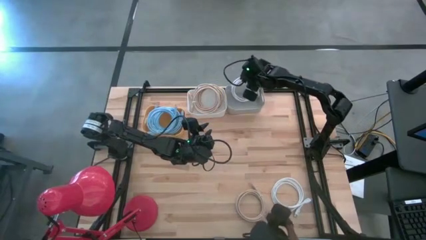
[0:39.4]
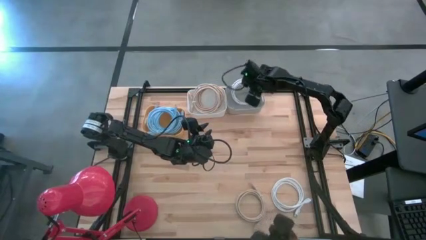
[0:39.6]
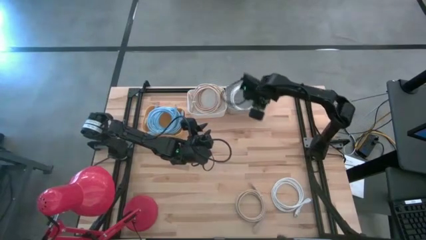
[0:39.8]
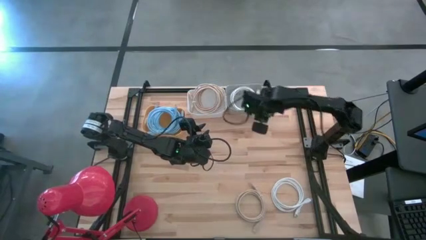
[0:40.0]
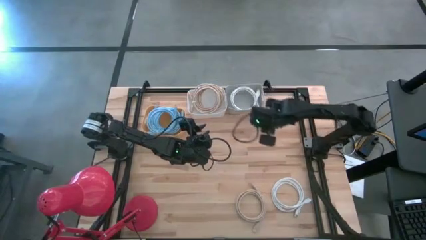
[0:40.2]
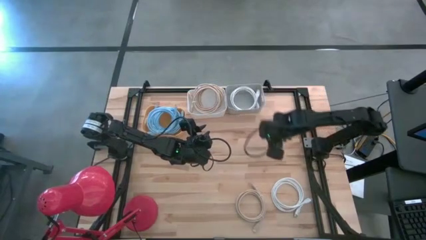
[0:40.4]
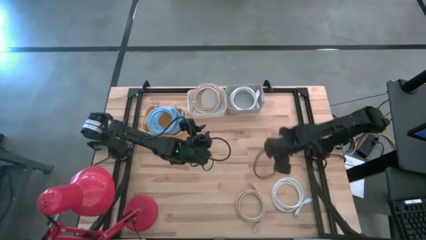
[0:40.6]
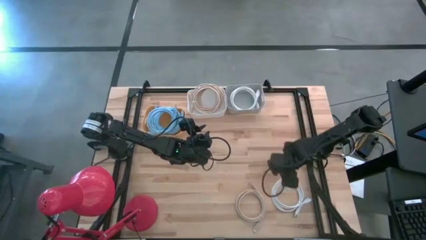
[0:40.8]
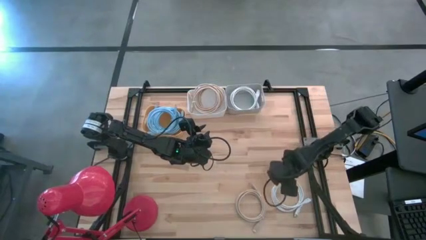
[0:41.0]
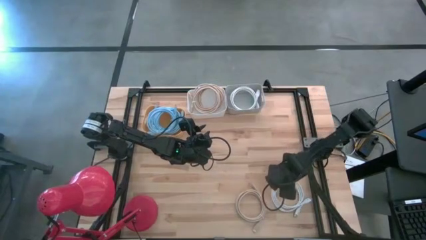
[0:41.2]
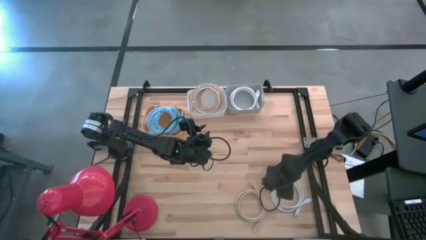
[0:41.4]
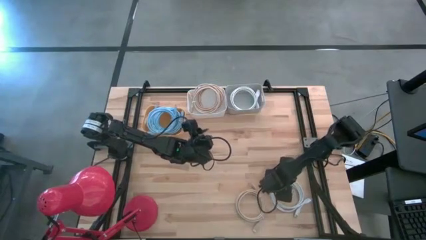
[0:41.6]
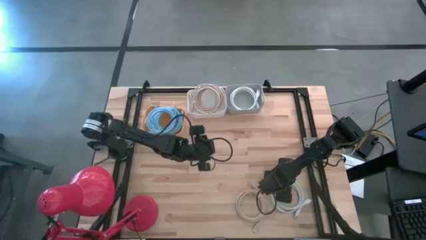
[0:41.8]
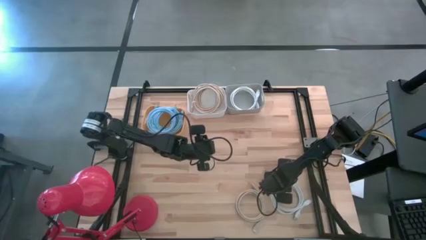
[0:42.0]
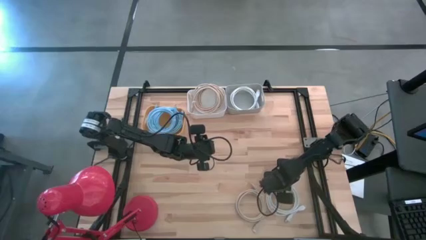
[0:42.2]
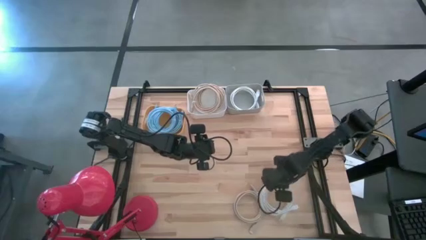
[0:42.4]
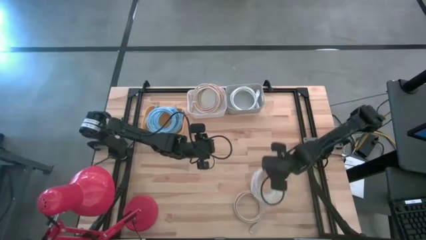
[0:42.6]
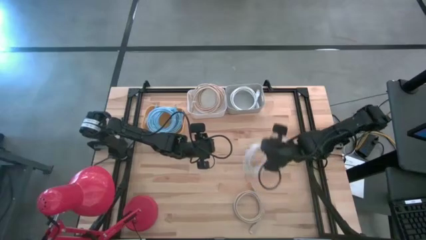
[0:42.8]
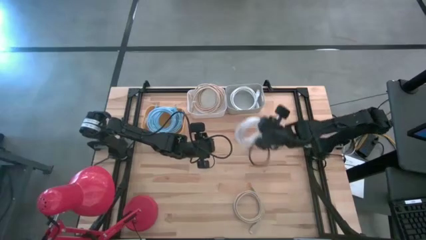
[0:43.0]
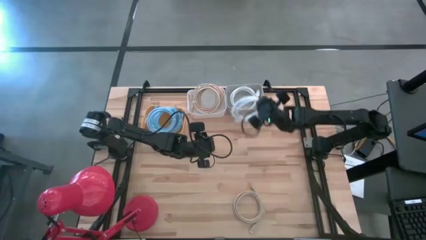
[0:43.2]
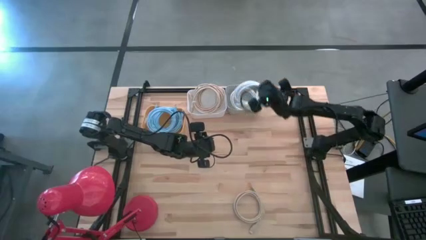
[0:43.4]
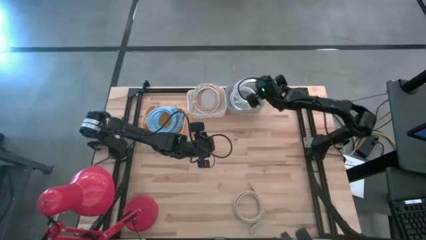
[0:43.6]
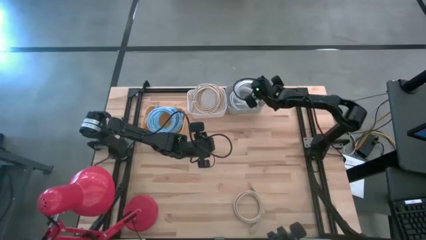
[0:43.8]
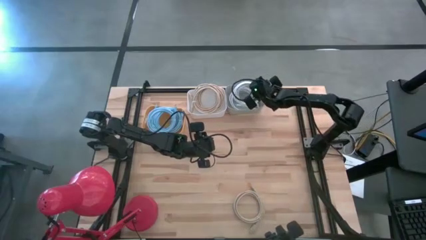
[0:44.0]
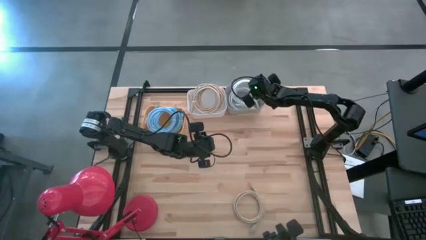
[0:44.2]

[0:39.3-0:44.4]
Task: Sort HDMI cables
Put the white HDMI cable into the gray bin

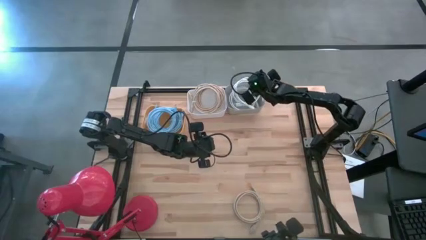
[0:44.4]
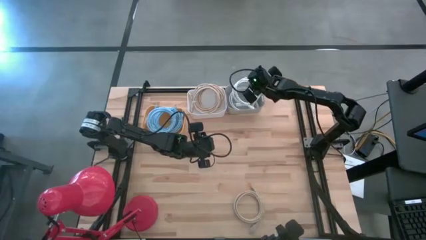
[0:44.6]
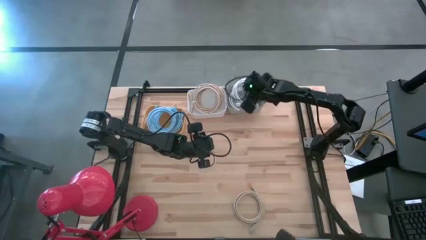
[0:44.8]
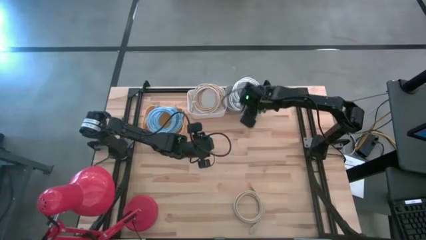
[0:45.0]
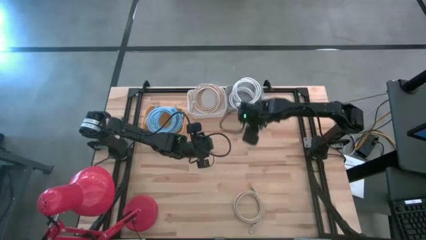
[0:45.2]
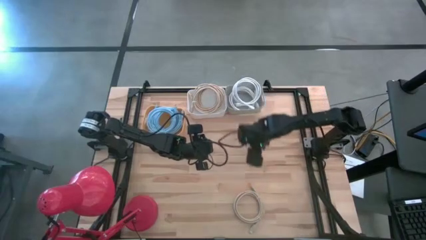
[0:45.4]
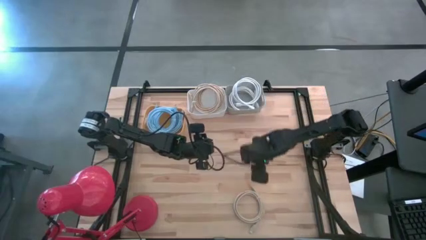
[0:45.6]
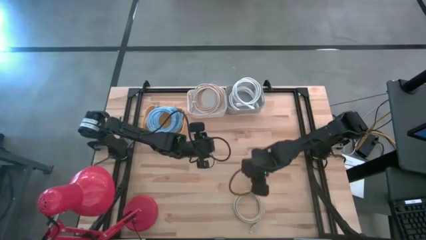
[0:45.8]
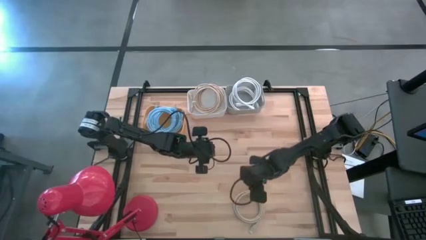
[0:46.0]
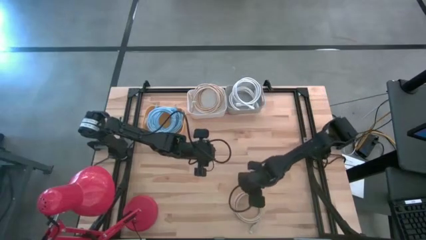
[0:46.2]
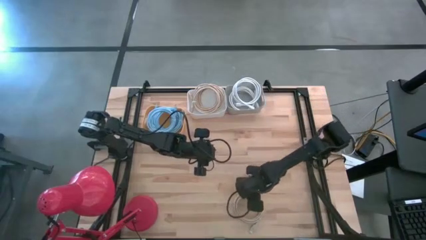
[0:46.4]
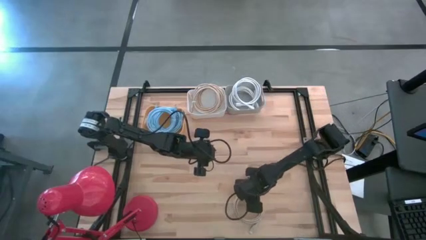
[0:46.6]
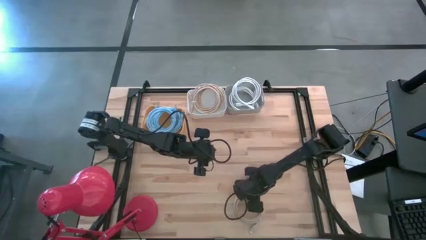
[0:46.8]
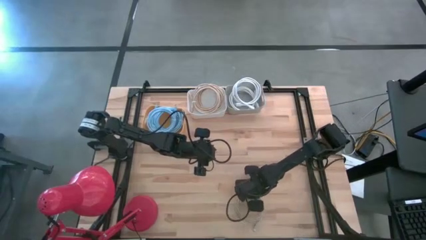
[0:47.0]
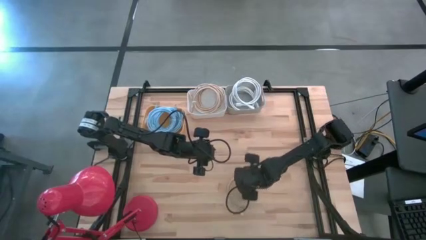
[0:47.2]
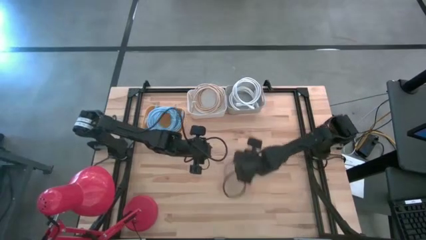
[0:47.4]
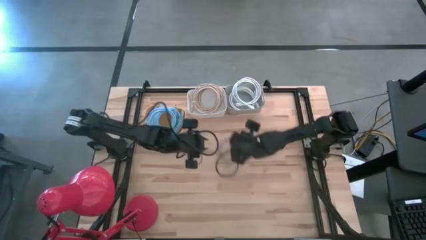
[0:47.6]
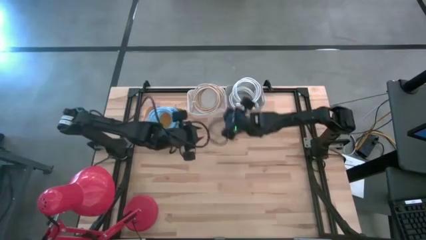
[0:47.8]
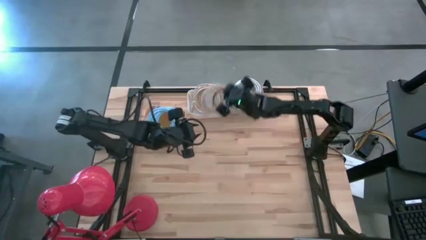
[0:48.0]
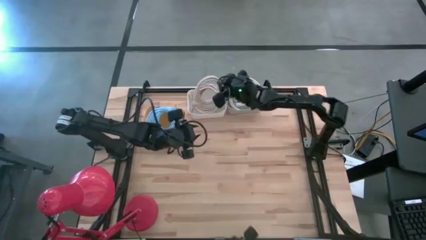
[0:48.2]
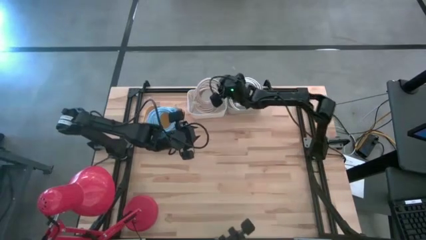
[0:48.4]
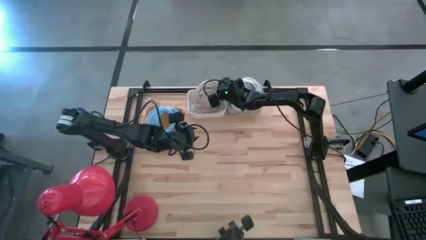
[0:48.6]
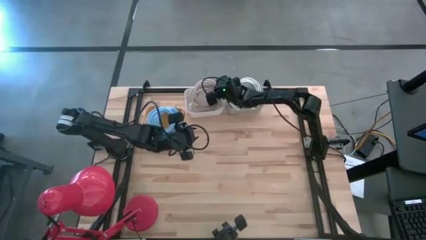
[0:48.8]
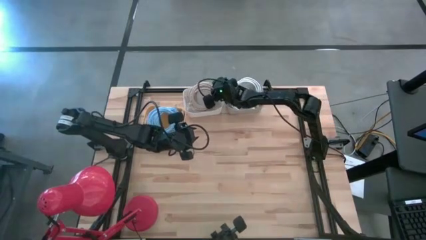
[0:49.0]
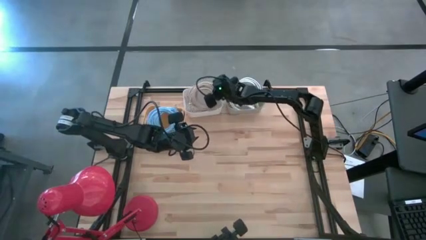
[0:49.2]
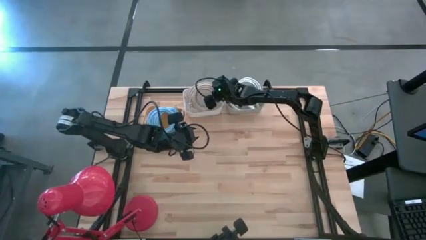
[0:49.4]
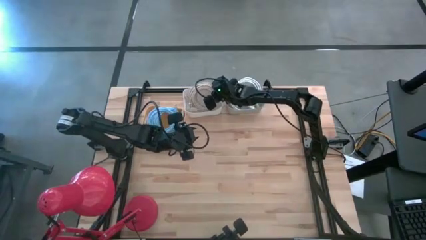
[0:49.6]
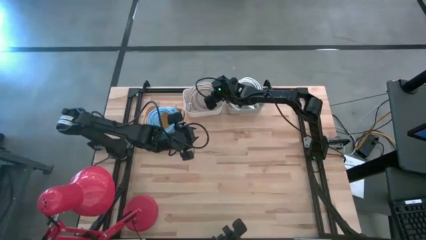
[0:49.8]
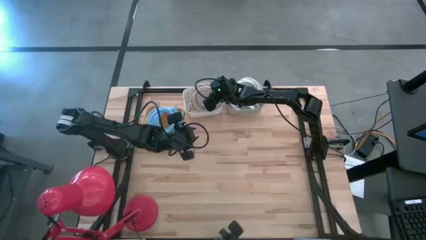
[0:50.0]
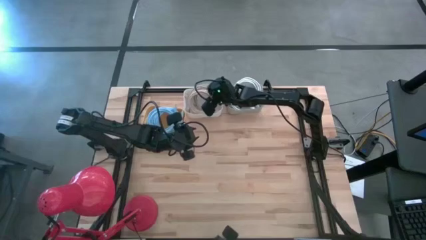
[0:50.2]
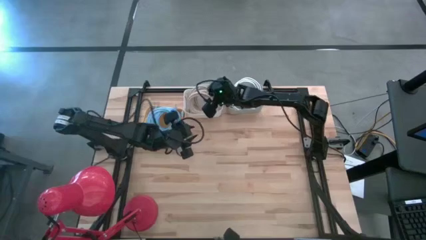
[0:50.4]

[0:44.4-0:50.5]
Put the brown HDMI cable into the white bin

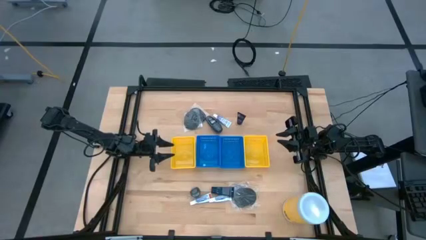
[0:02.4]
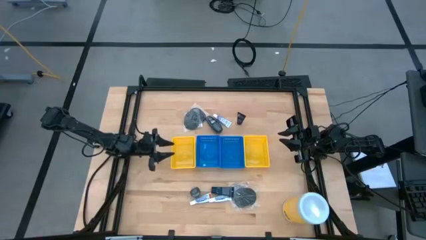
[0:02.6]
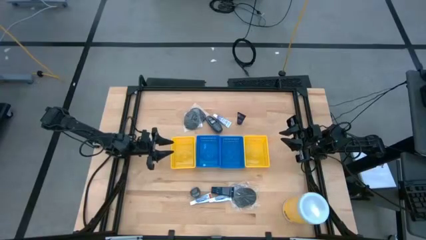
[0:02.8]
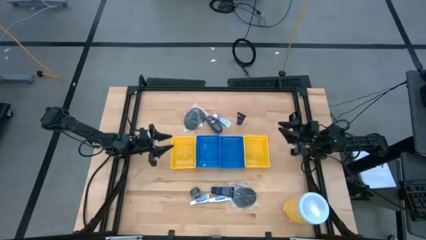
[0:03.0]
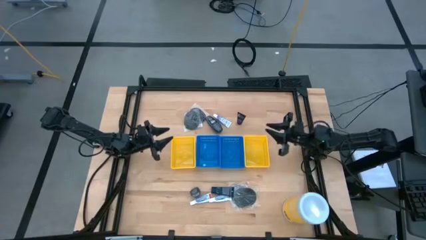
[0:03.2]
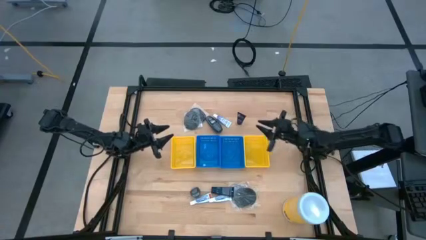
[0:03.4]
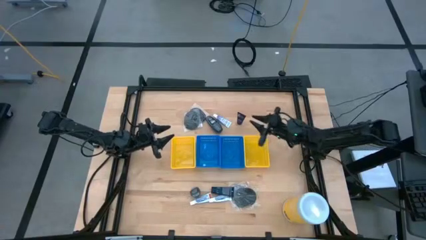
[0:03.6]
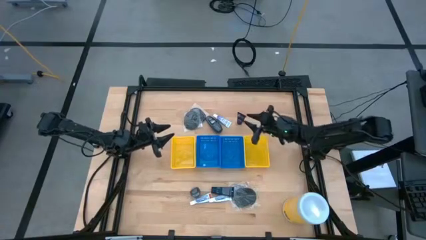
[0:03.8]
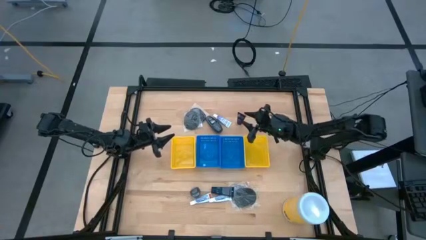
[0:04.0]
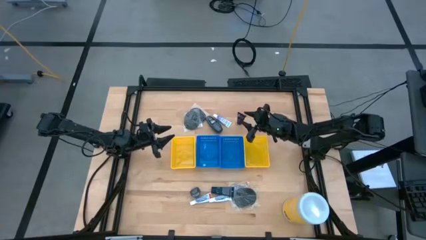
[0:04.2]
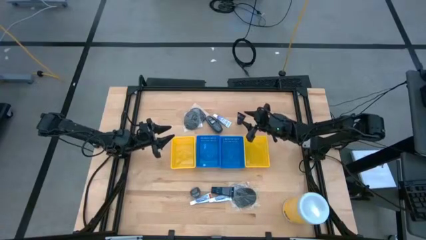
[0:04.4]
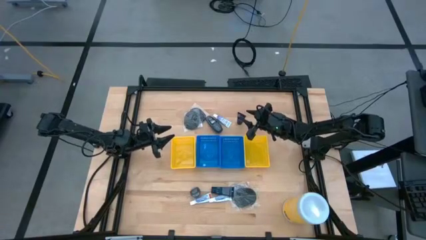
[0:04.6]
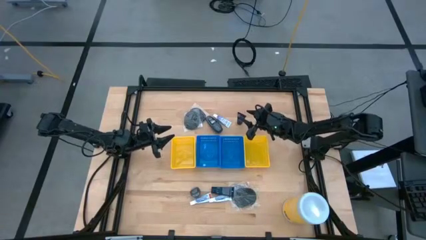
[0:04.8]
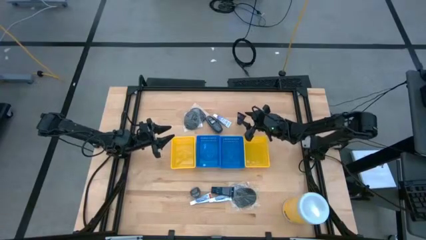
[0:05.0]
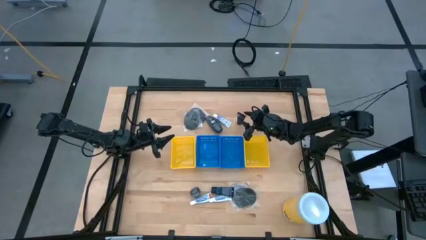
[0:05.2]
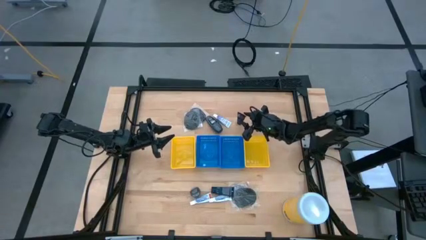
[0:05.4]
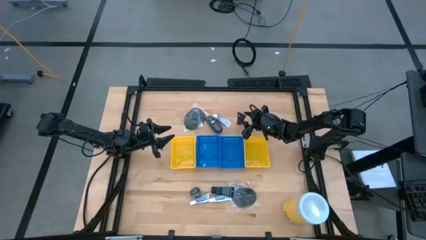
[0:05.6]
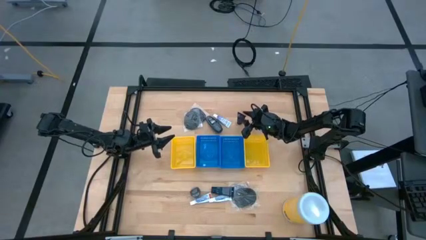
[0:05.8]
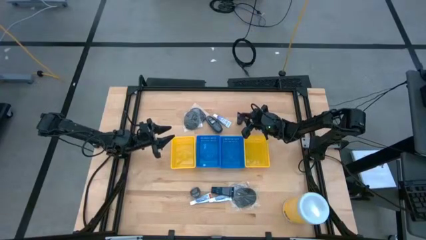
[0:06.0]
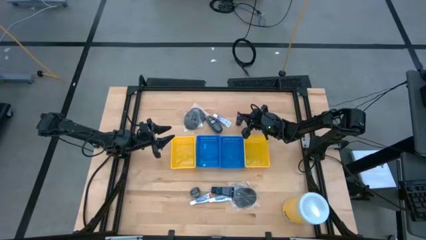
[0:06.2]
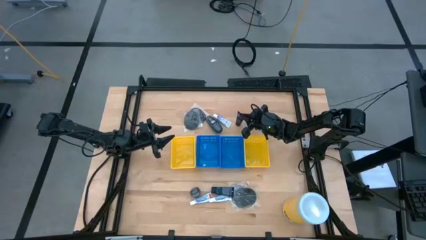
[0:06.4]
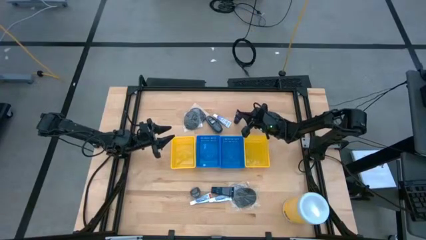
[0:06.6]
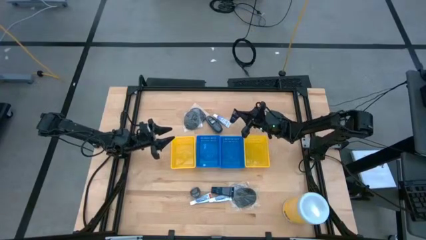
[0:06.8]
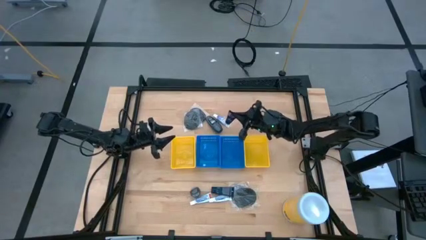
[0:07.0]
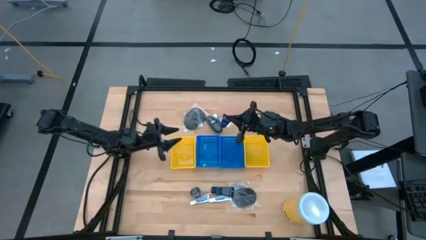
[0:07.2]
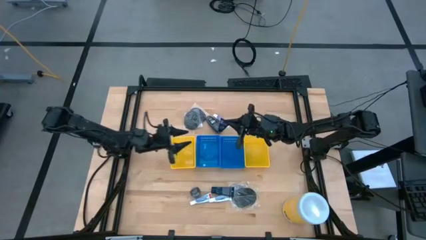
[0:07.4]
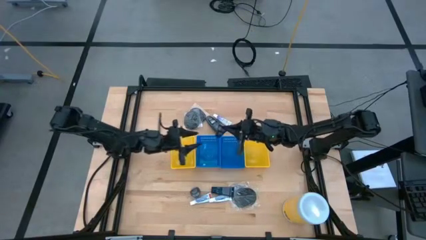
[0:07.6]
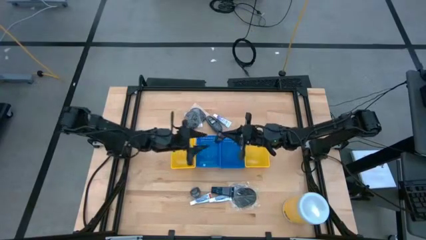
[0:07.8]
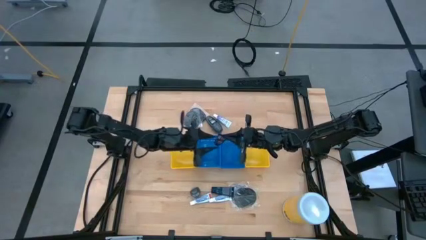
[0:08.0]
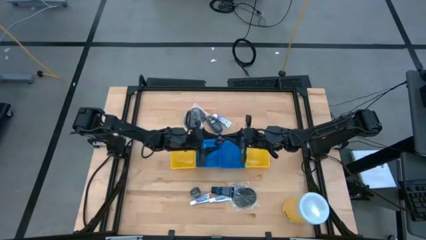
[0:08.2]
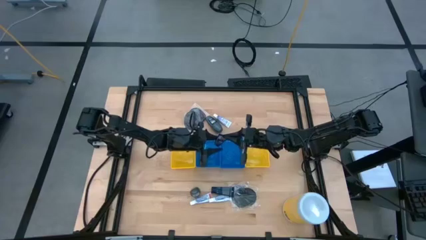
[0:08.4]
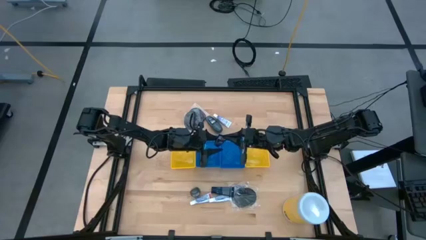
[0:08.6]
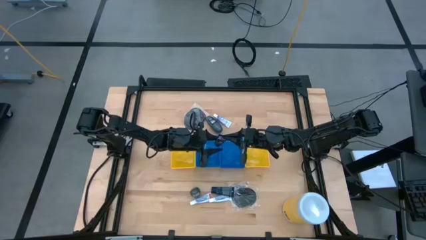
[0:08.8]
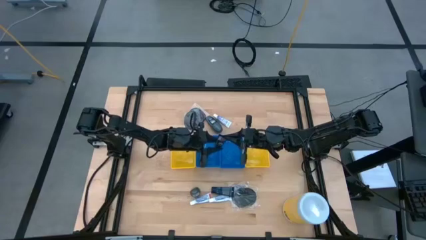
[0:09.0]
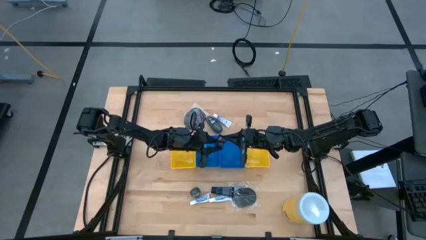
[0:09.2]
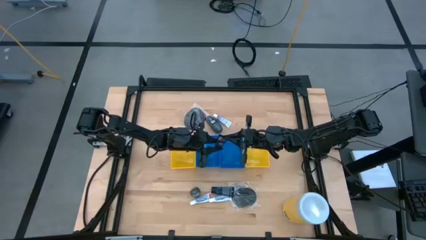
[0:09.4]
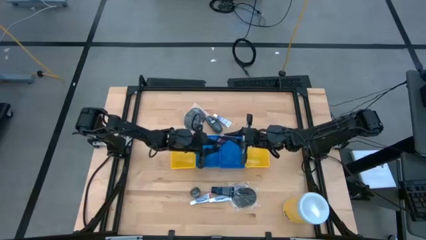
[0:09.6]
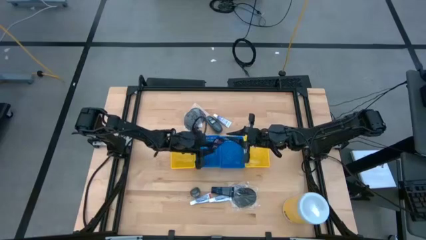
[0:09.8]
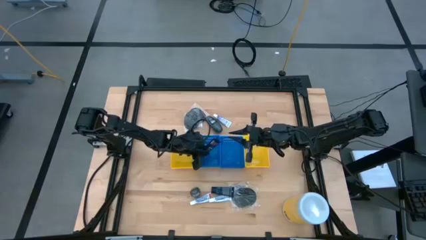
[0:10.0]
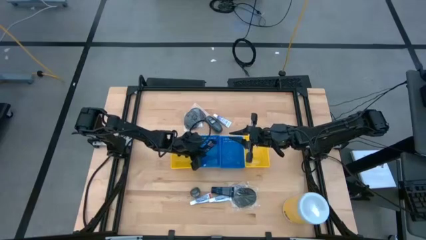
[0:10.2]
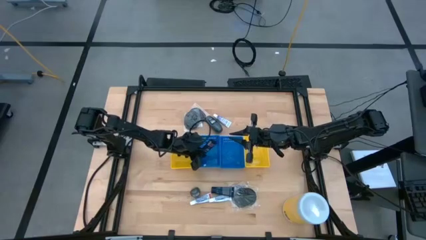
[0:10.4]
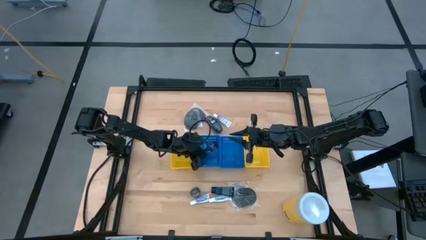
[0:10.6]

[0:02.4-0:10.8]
Task: Pick & Place Travel size toiletries
Put the dark blue shaving cream into the left blue bin
